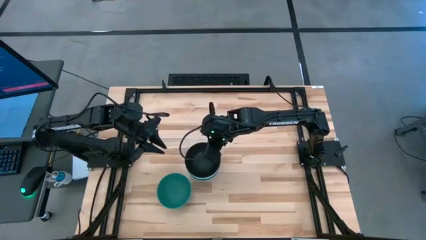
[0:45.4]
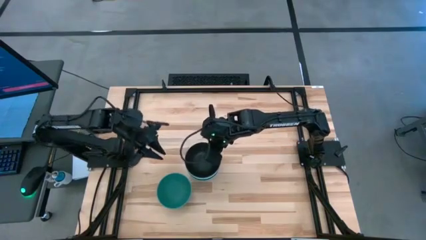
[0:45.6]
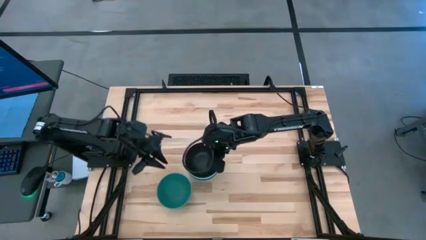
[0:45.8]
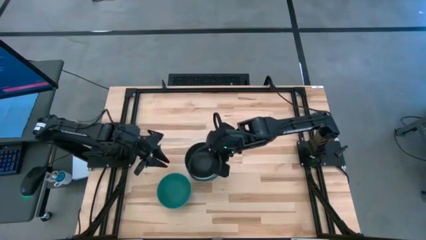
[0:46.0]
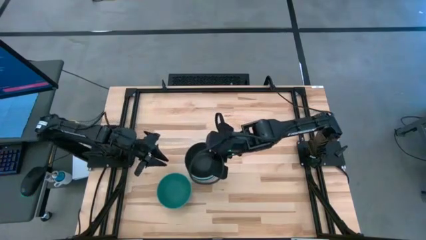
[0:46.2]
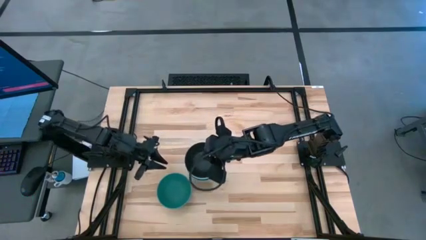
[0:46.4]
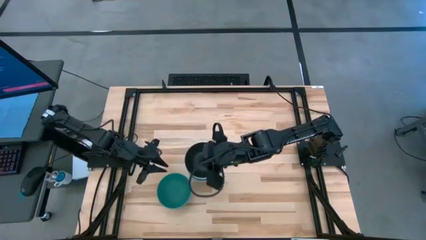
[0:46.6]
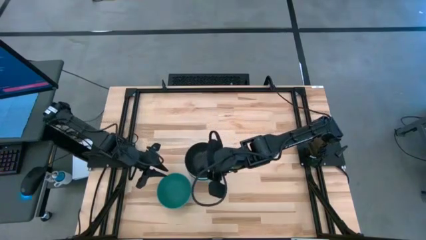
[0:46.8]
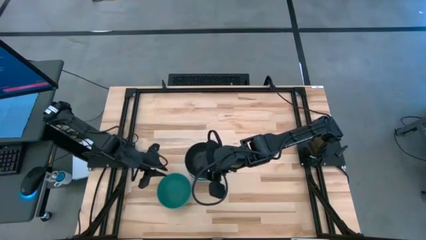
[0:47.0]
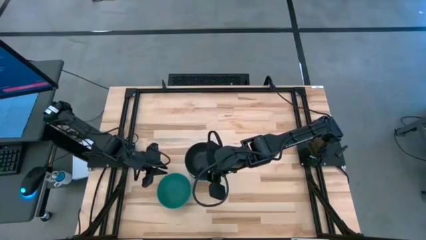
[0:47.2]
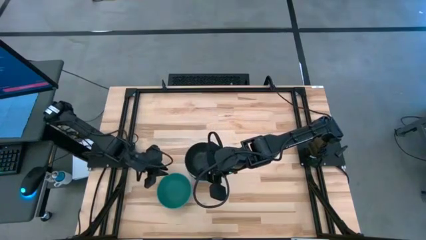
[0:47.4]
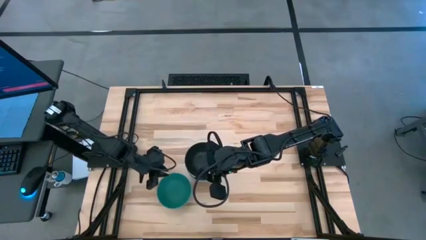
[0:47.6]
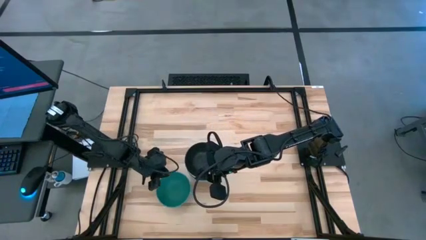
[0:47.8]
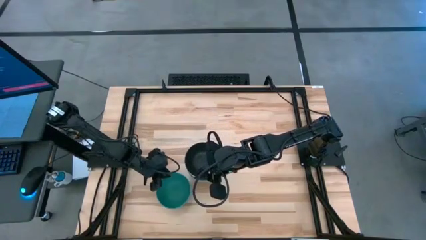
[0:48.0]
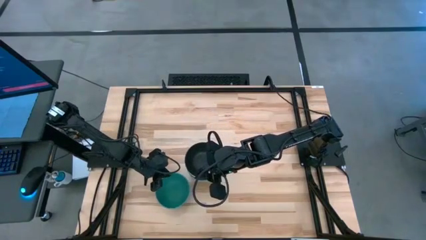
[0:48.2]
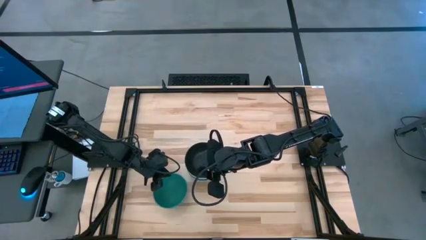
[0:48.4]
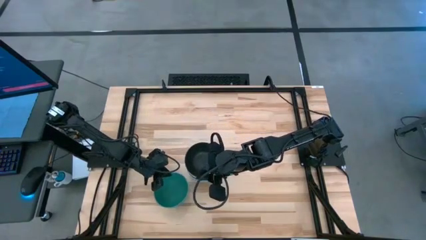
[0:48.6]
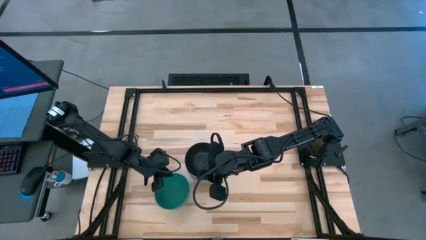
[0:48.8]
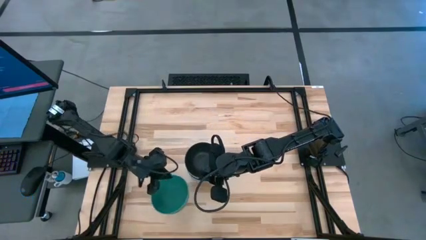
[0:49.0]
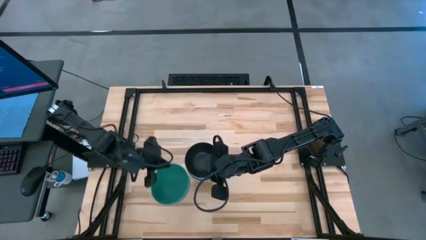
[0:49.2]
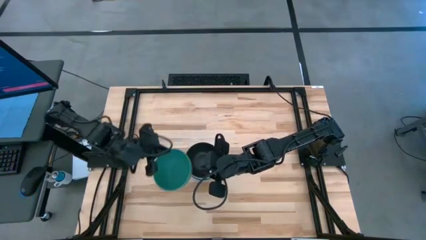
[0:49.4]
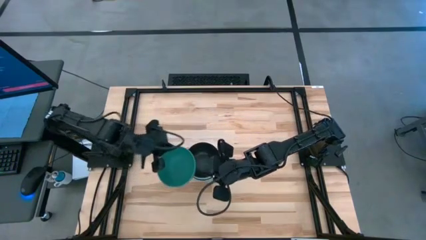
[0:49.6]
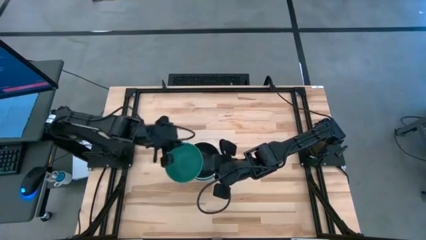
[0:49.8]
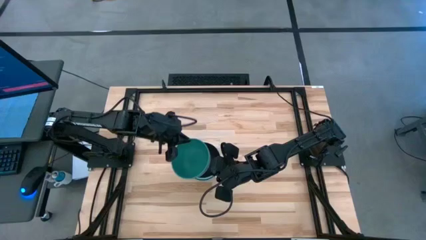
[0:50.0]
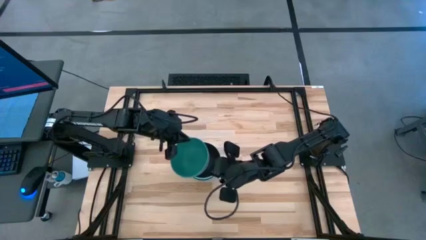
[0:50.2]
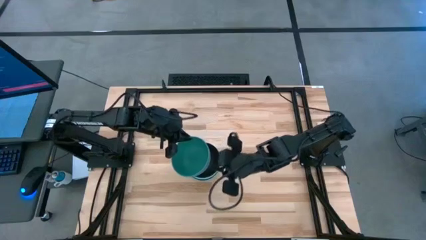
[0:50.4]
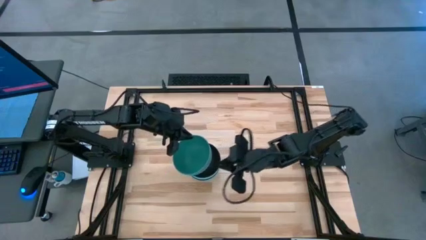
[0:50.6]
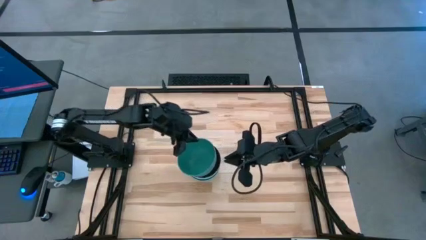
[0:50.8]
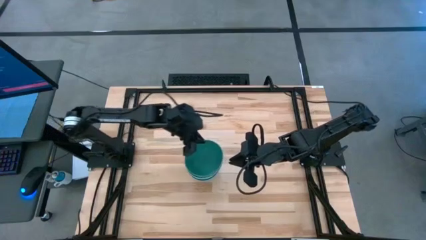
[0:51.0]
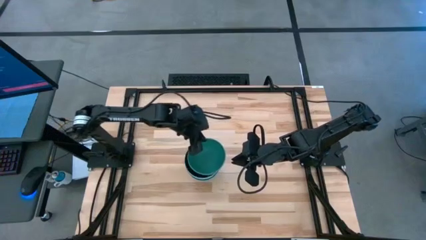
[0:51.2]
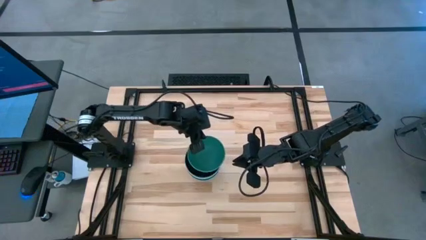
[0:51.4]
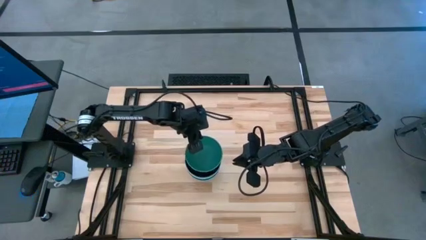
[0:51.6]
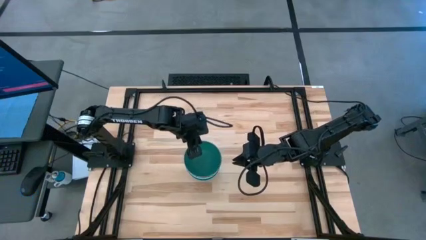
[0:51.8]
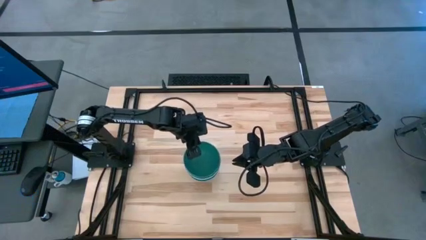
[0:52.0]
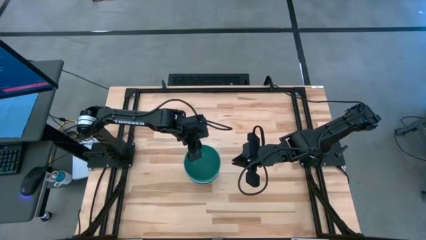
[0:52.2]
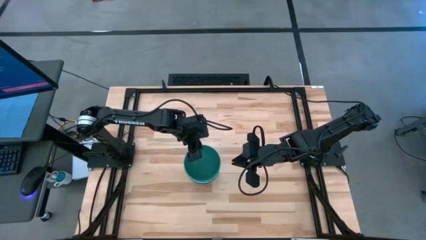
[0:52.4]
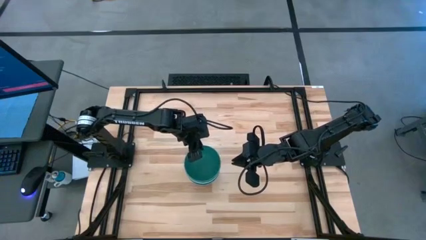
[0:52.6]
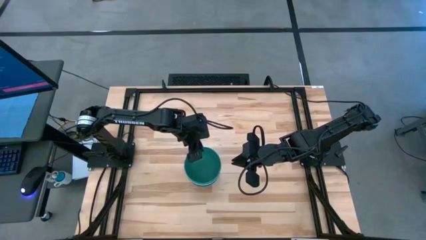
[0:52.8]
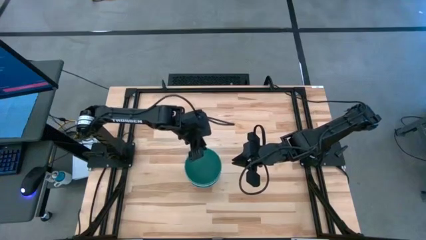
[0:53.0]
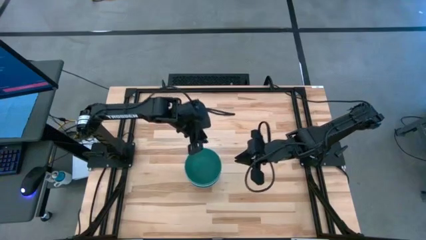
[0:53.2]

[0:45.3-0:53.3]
Task: Nest bowls inside each other
Stack the green bowl on top of the black bowl

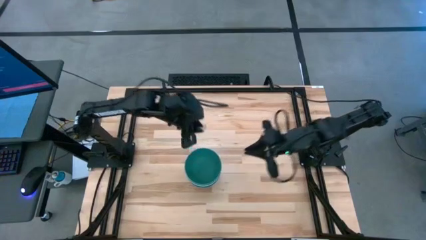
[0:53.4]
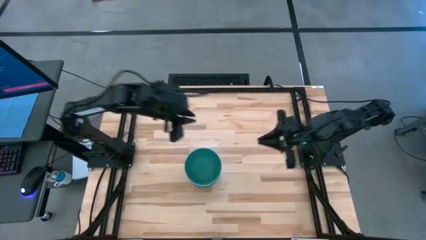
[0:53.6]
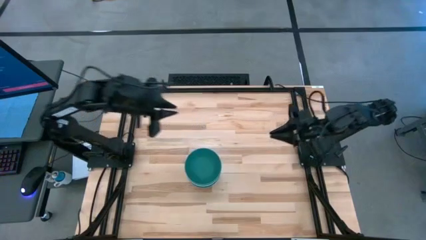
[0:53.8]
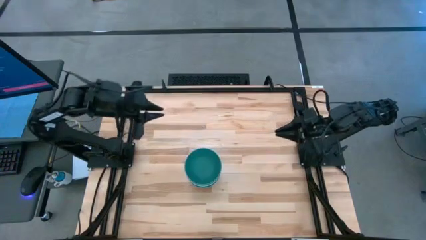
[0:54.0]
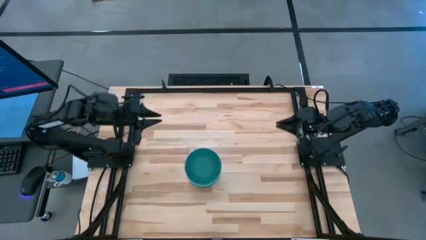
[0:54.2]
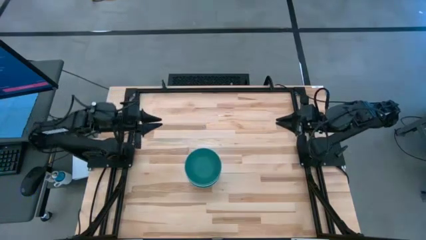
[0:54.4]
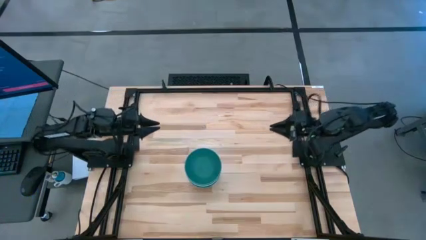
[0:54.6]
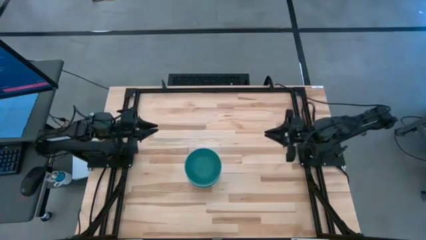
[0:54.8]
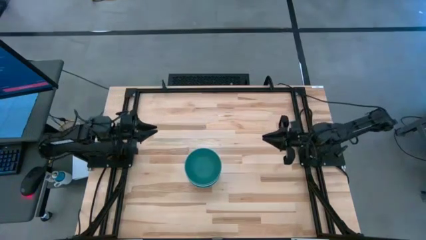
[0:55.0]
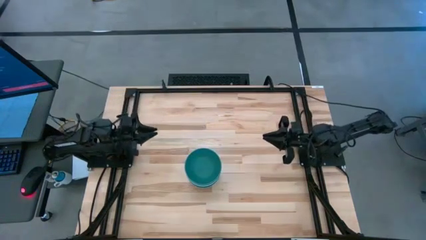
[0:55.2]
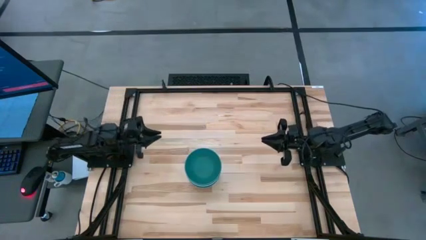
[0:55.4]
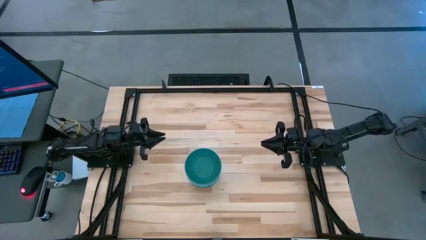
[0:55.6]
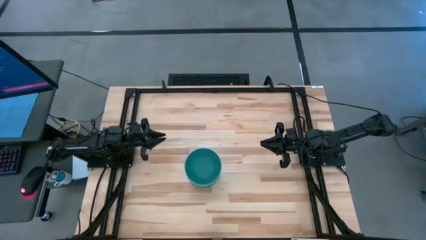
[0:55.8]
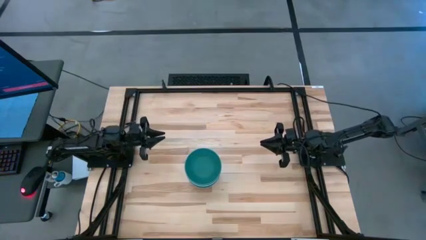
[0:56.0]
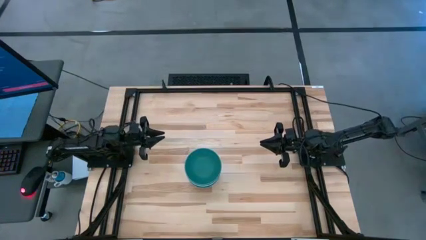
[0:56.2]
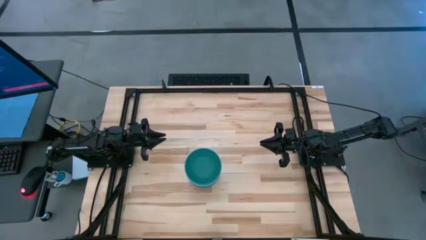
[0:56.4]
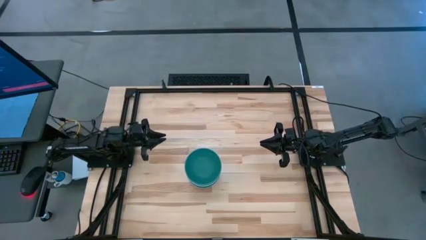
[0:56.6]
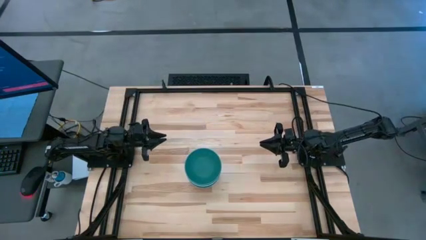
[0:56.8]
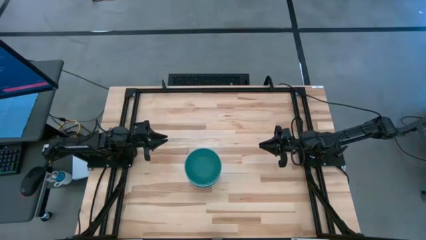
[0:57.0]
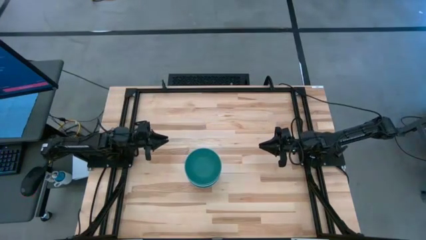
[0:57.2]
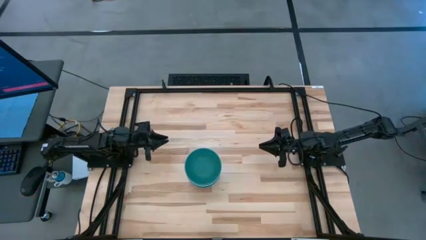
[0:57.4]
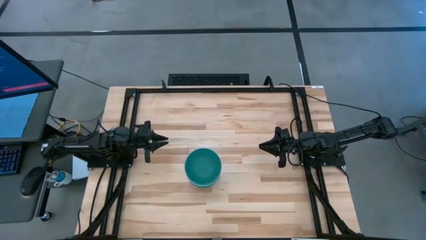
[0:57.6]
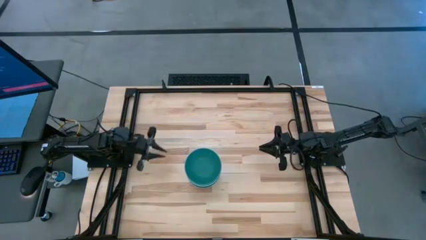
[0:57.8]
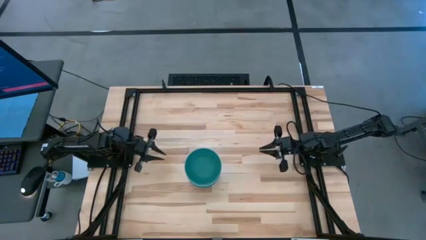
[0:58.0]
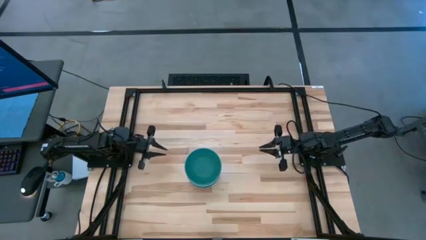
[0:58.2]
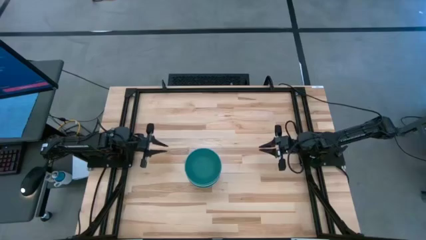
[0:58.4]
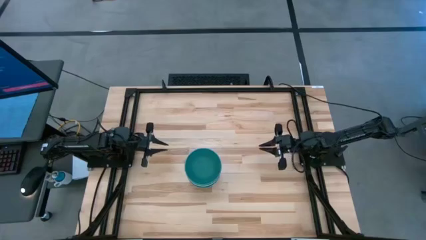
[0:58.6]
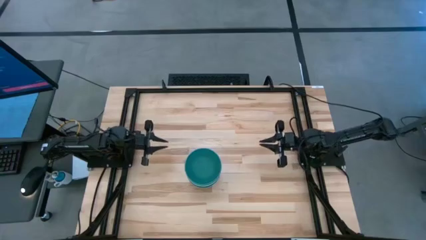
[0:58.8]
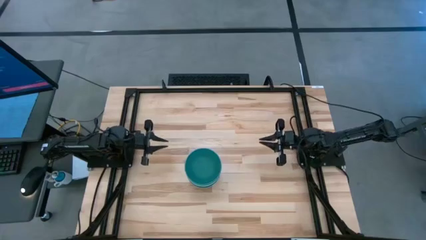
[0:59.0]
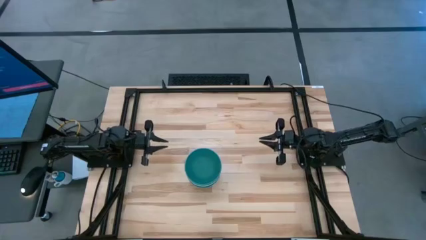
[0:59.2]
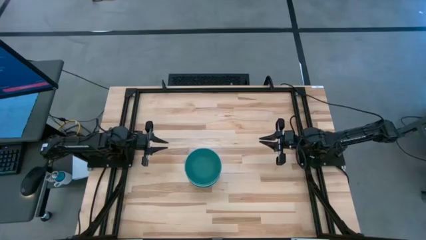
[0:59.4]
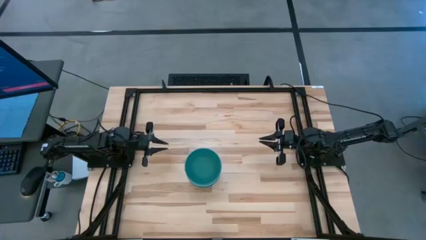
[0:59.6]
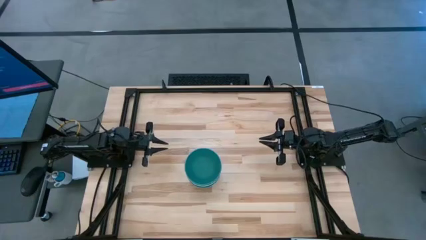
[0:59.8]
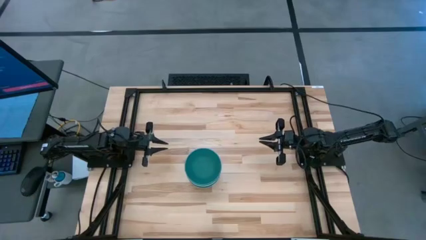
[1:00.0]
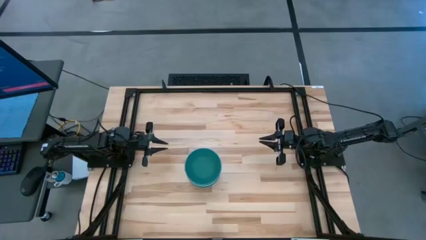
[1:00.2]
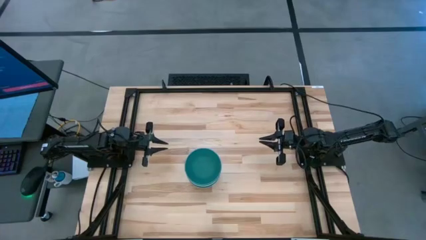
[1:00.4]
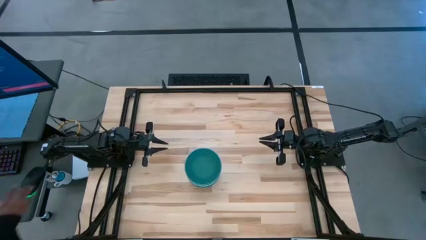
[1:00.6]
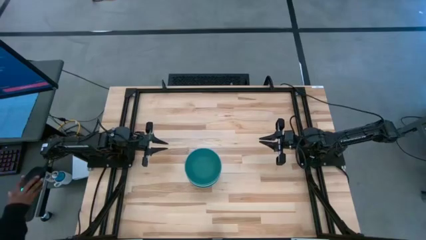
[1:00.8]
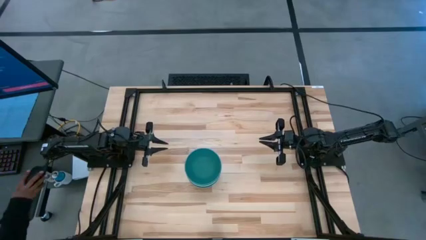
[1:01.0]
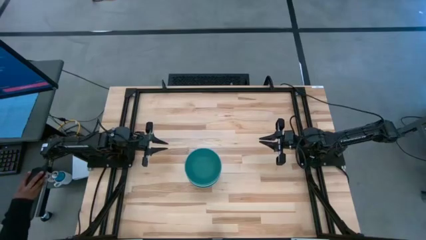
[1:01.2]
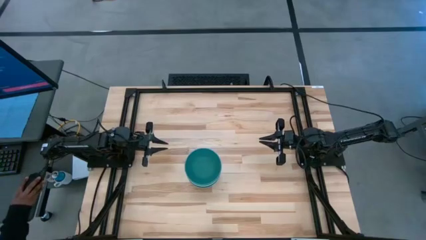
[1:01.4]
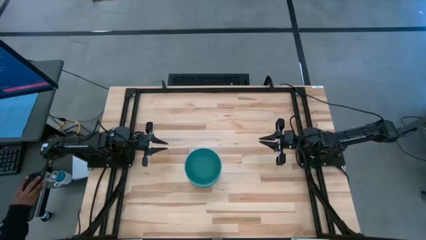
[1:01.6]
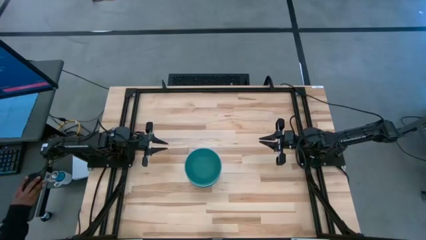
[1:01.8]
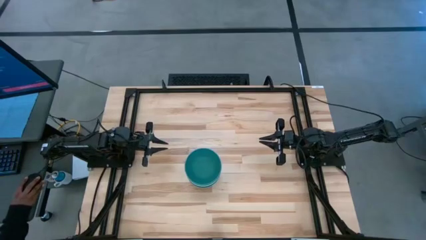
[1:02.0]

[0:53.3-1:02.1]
Return to Home Position
